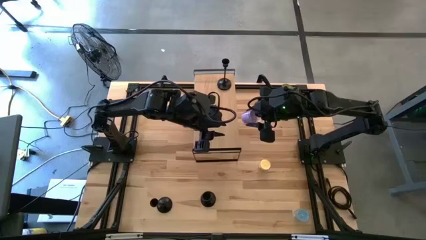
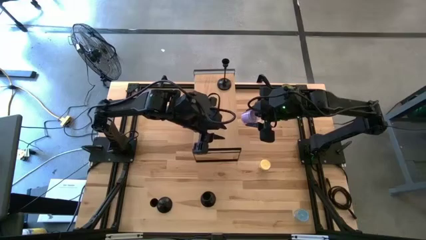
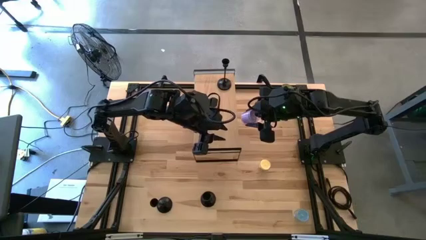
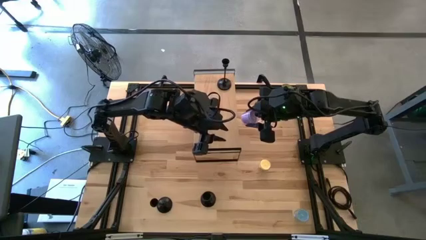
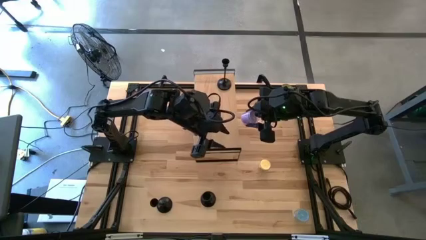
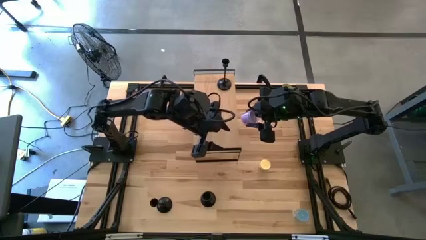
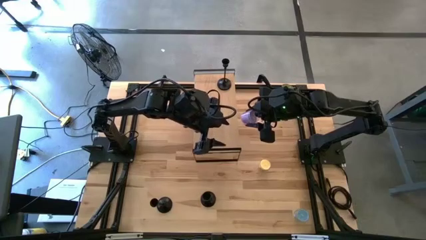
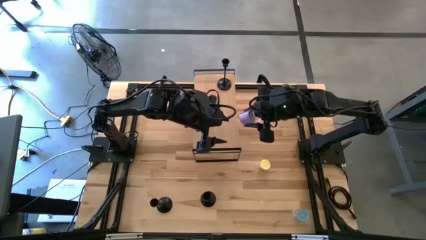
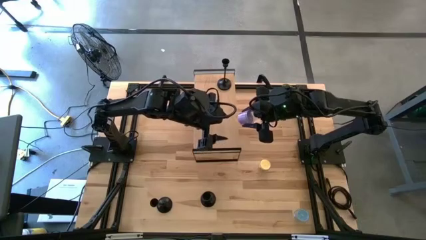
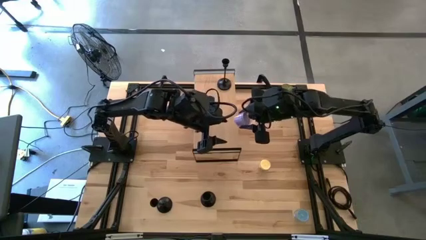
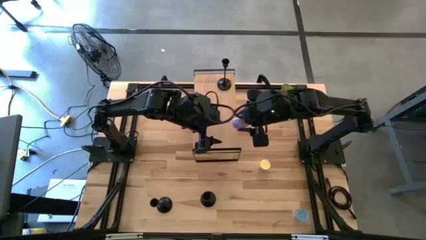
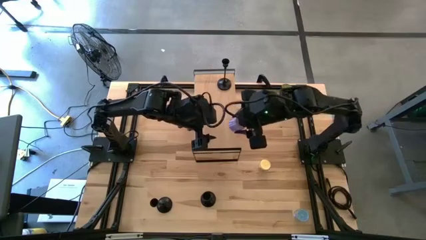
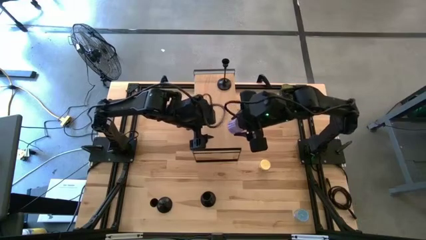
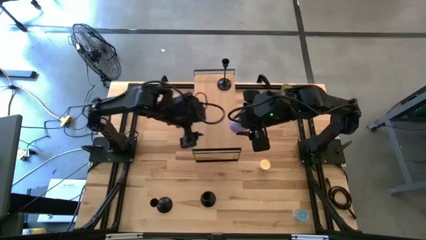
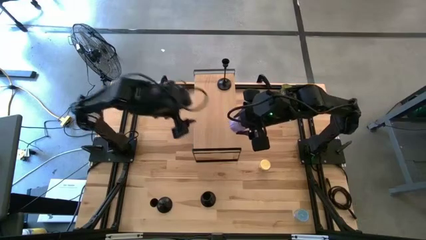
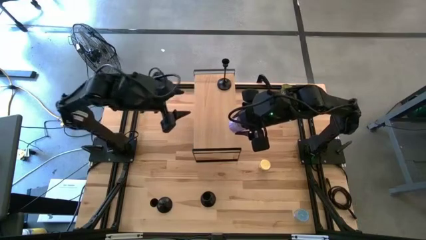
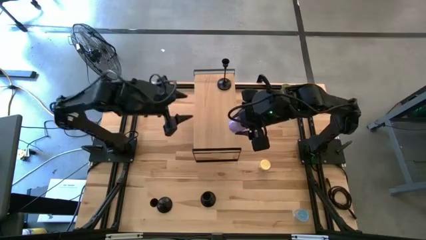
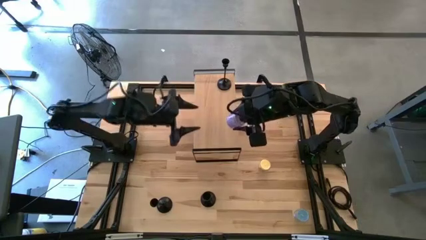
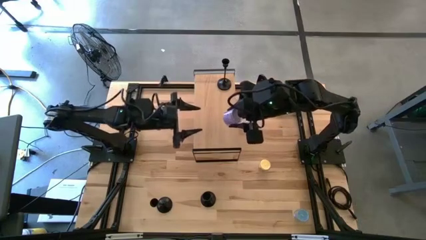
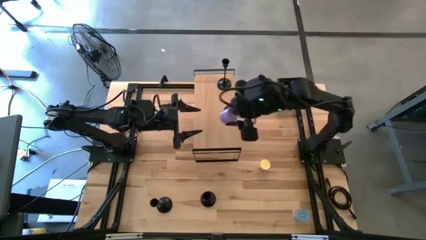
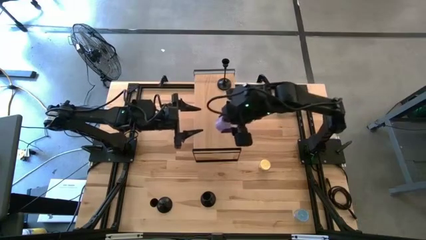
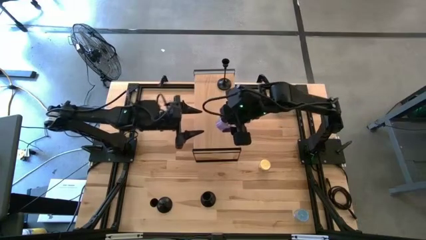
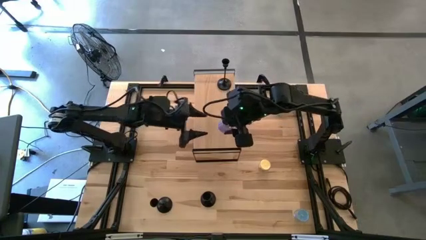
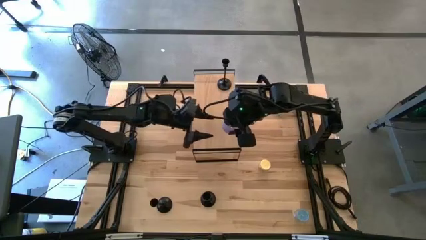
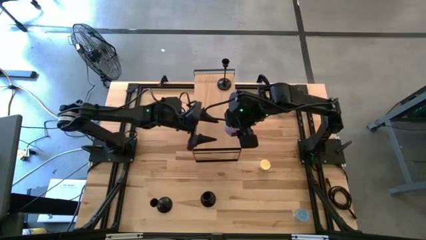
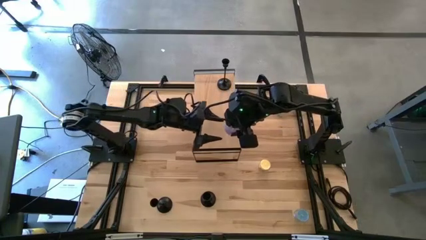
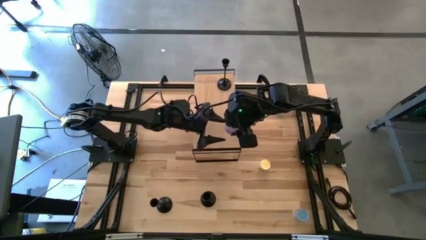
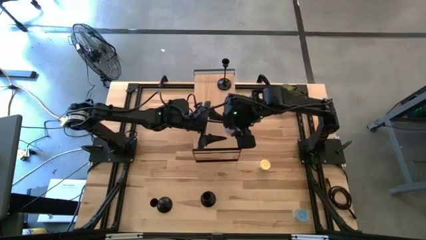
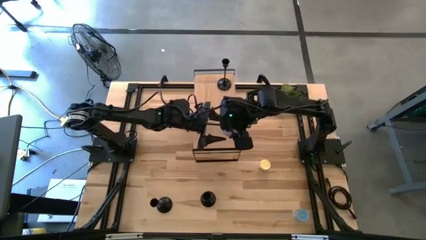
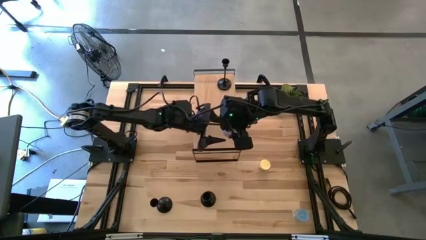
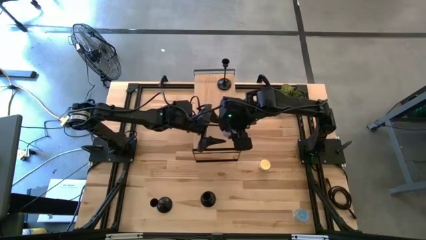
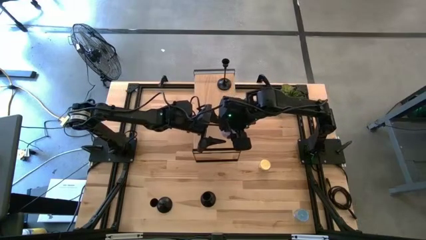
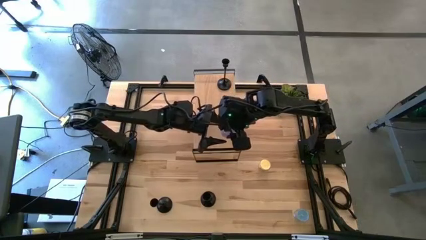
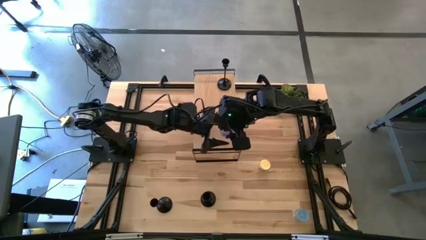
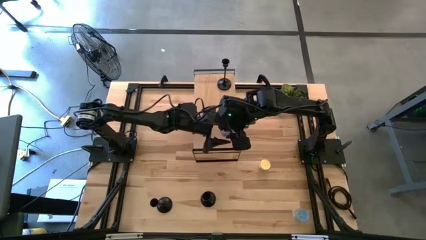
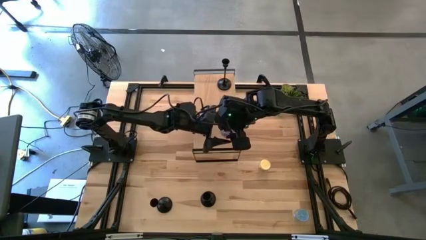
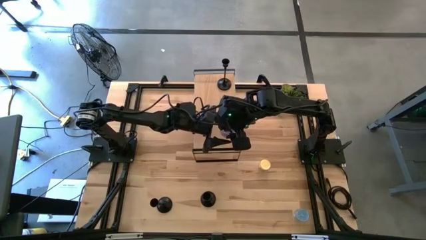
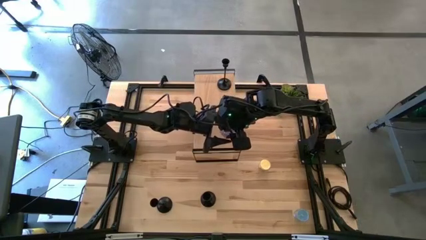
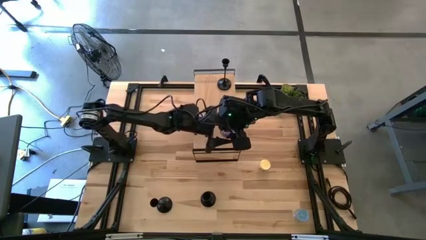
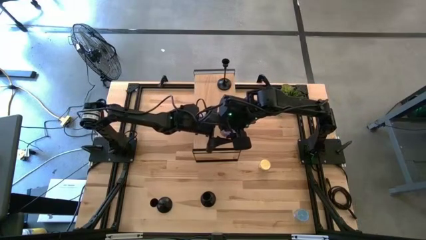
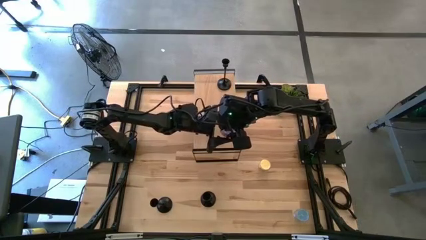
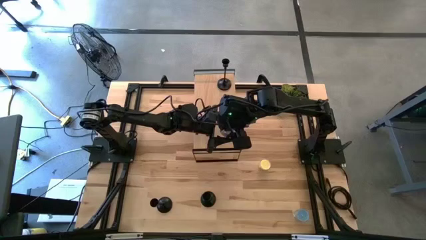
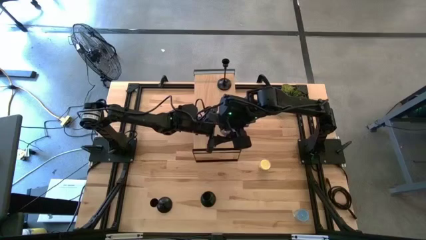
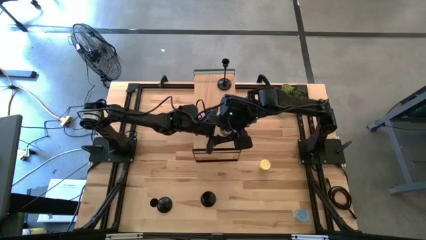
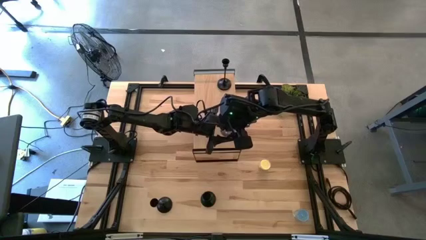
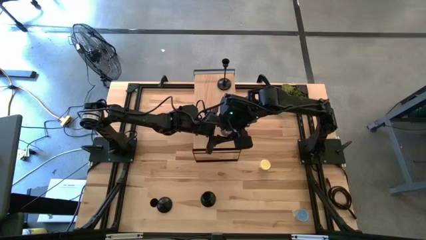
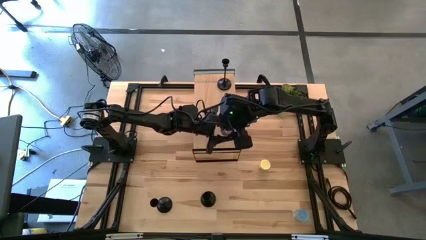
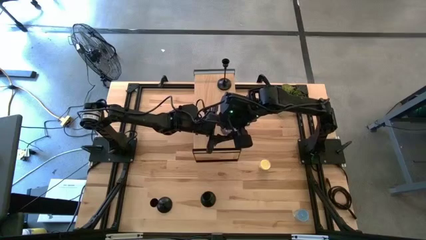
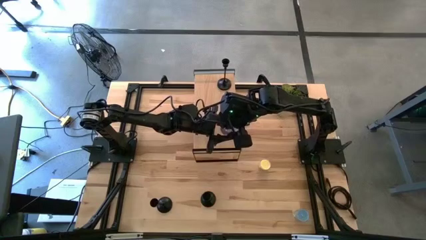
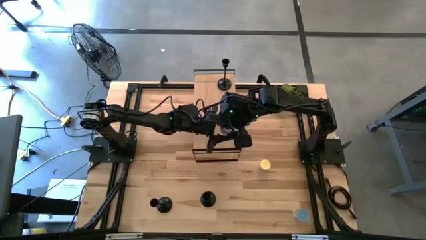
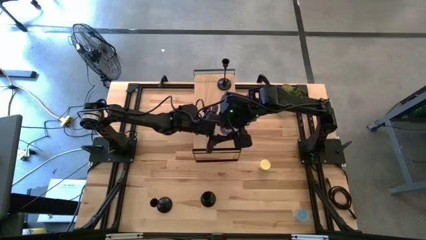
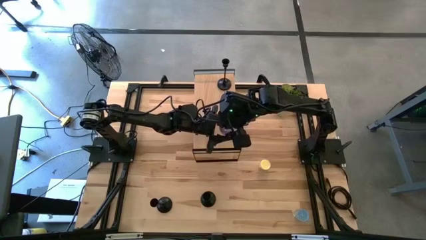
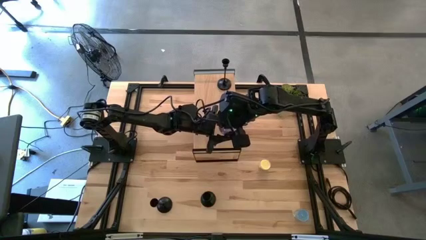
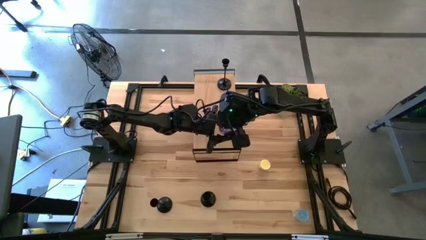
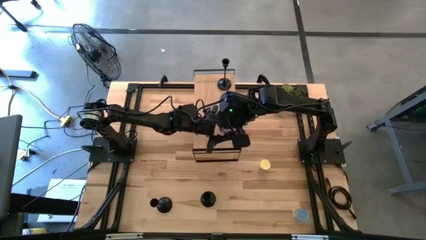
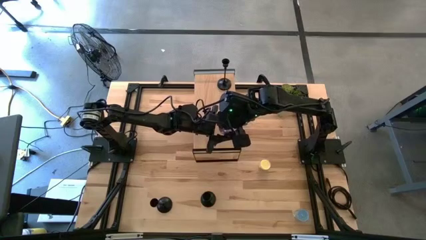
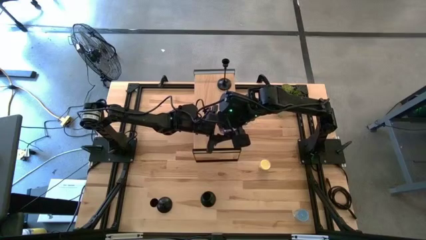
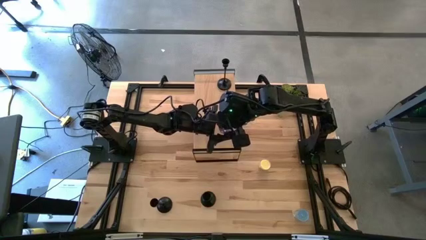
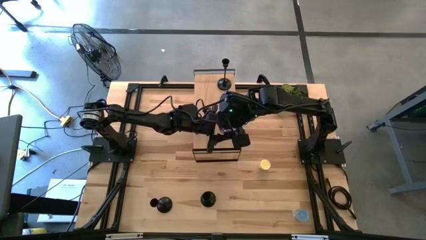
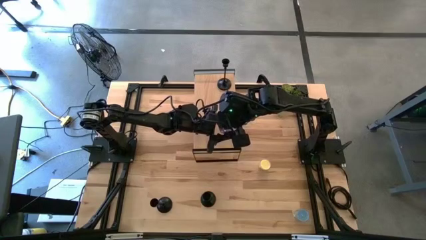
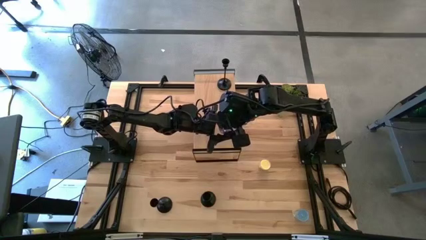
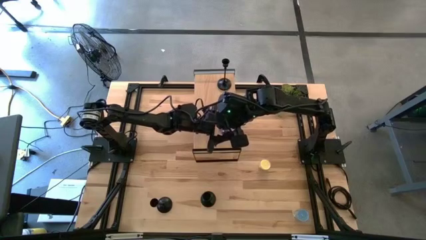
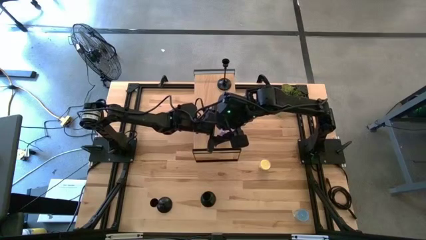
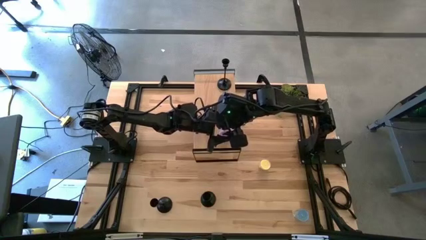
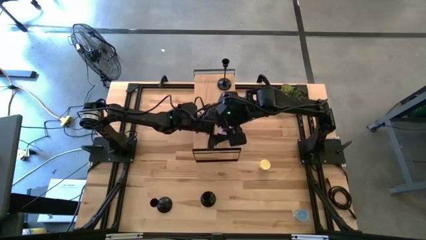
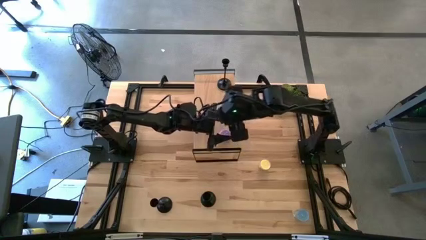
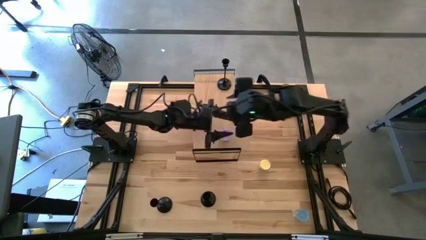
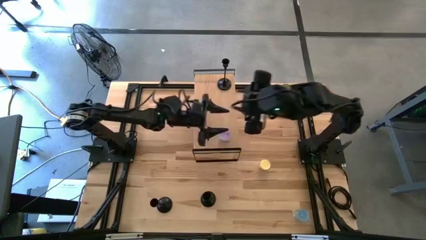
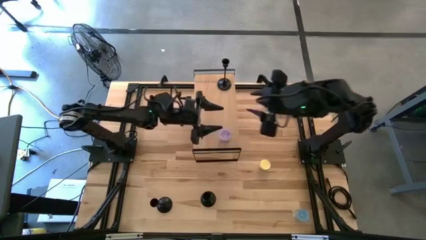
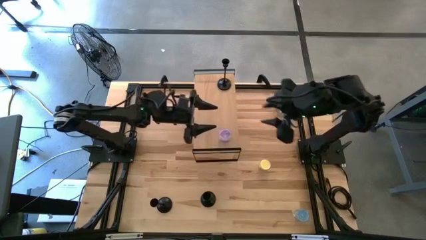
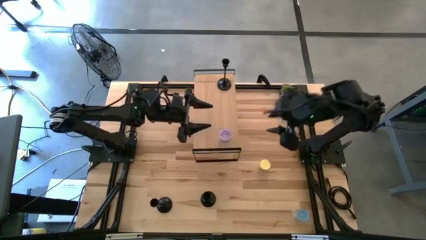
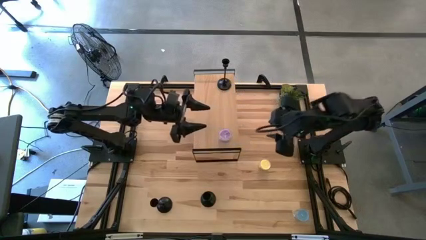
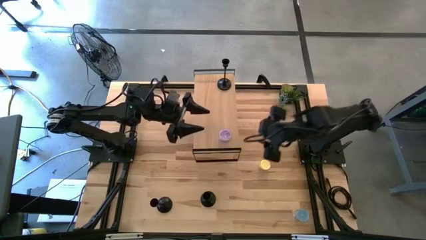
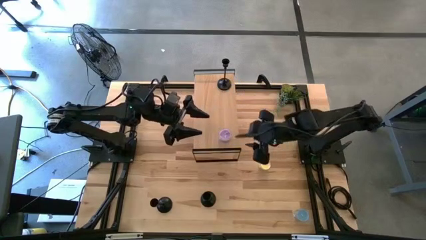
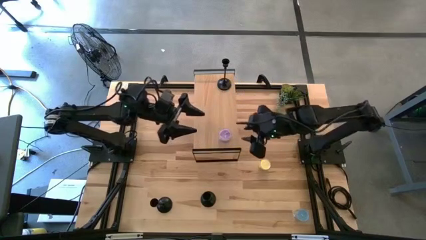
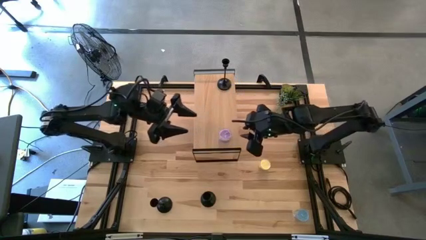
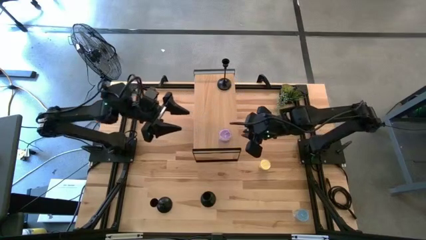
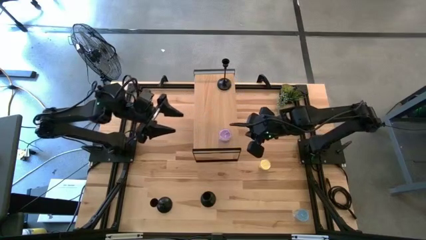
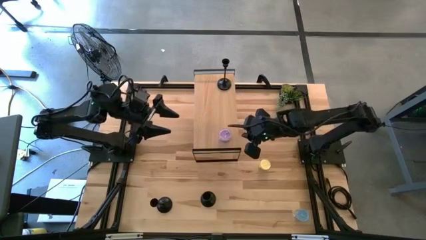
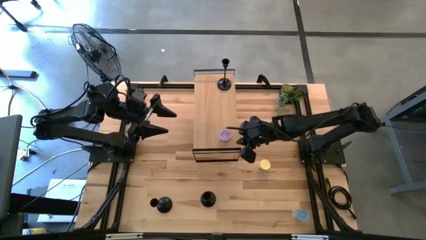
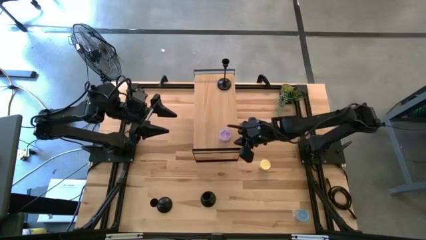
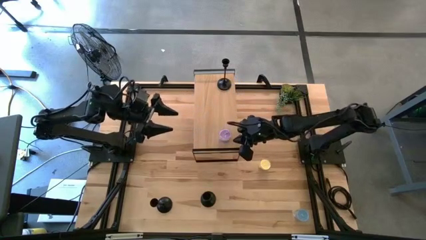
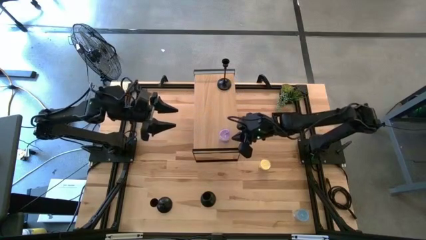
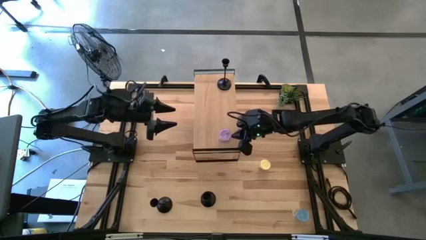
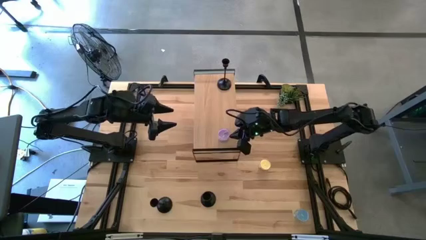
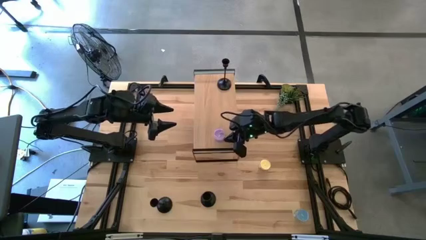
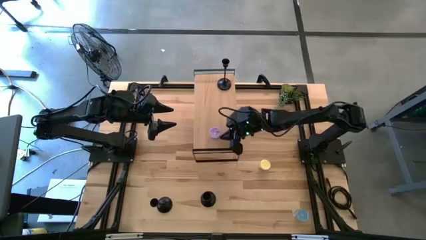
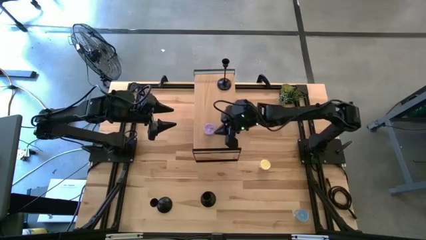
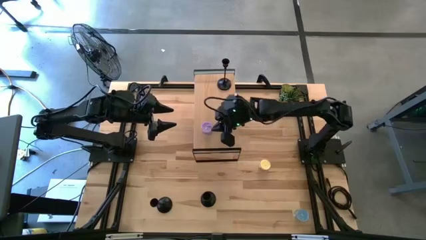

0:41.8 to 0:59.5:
Task: Pick & Place candle stick holders
Put the purple scented candle on the shelf
